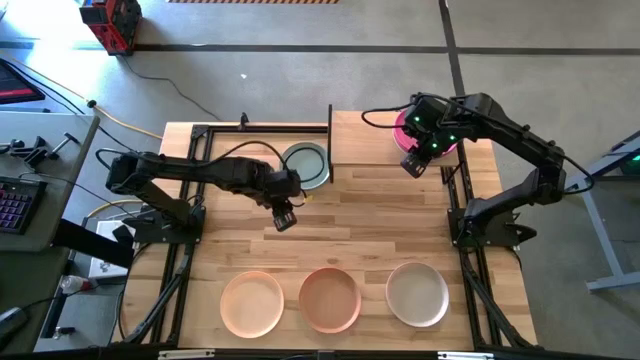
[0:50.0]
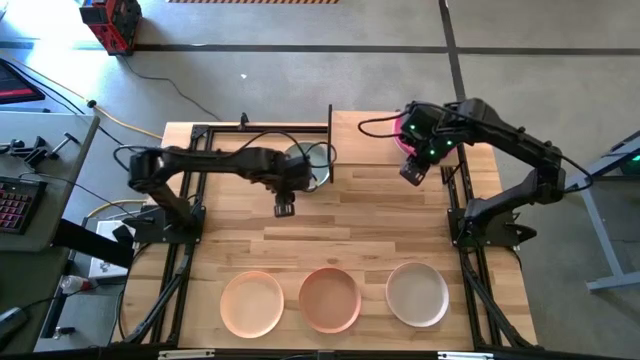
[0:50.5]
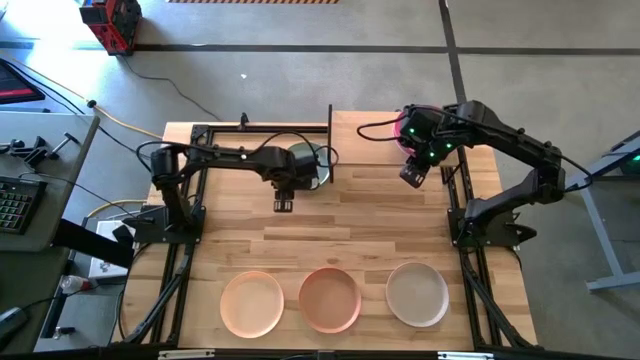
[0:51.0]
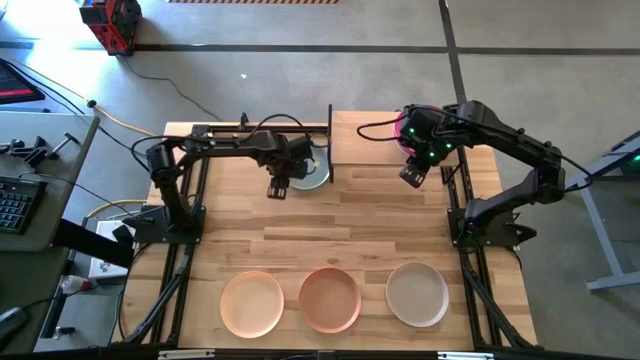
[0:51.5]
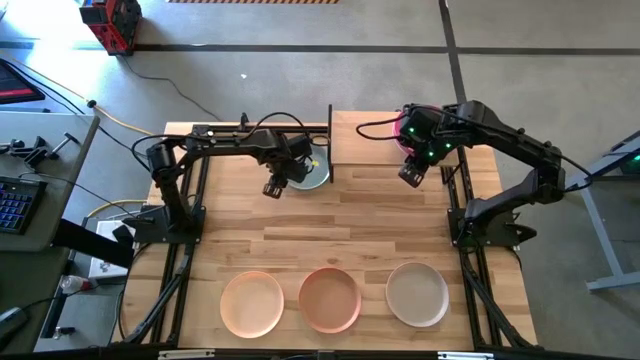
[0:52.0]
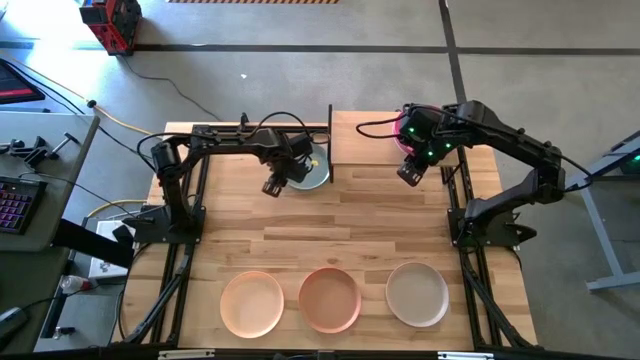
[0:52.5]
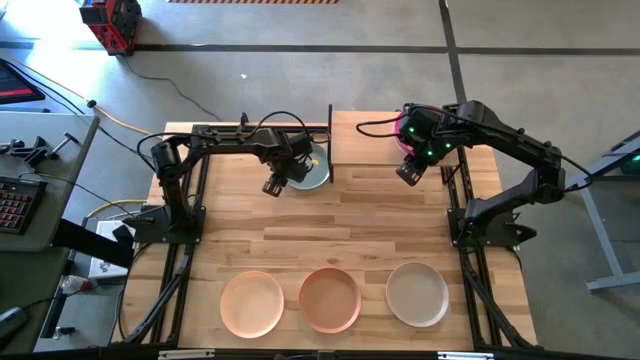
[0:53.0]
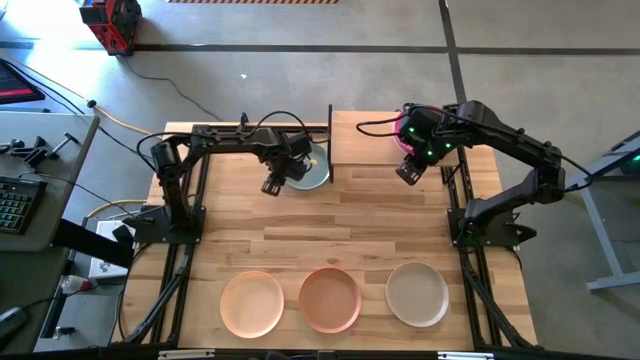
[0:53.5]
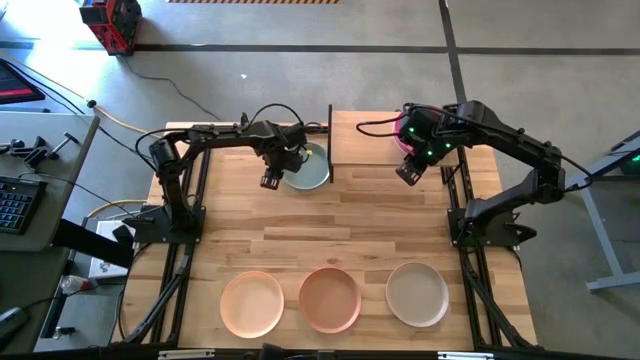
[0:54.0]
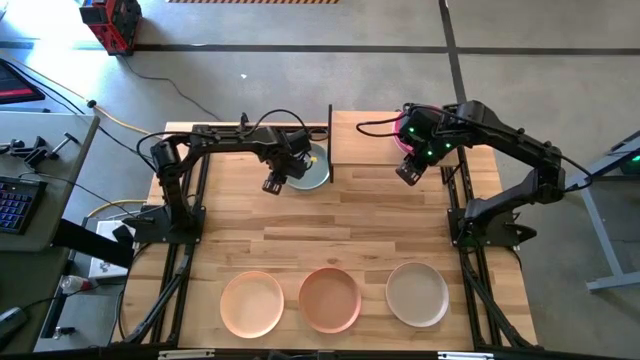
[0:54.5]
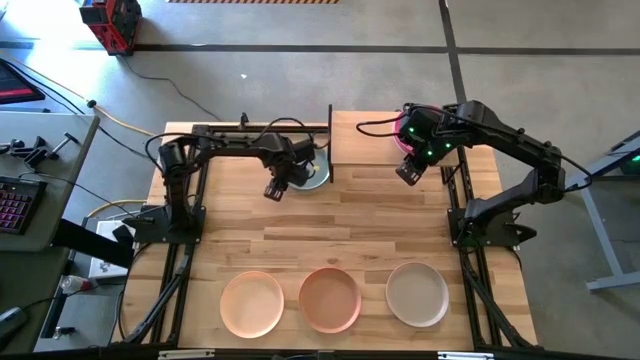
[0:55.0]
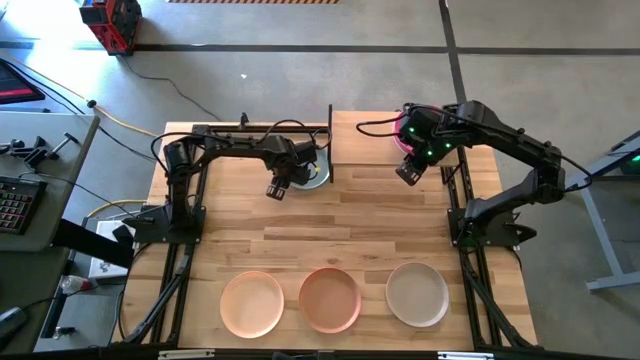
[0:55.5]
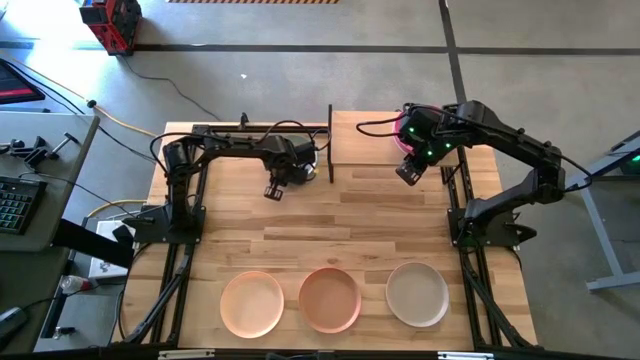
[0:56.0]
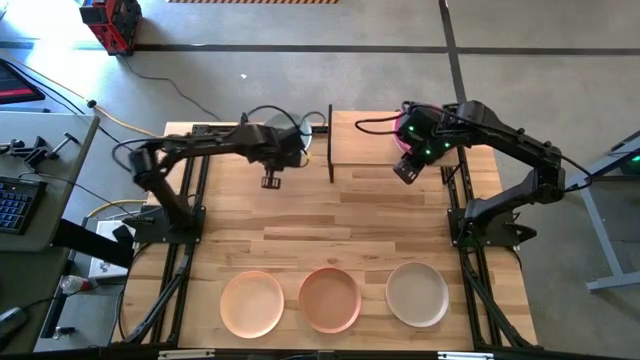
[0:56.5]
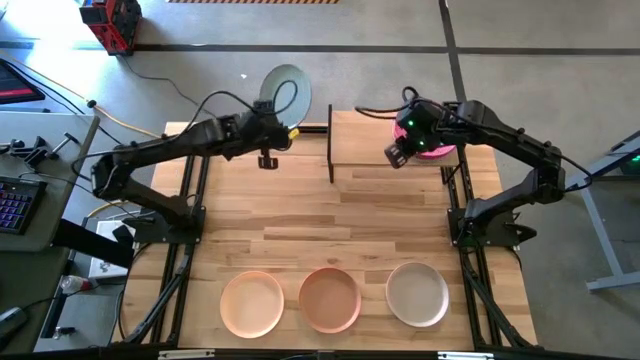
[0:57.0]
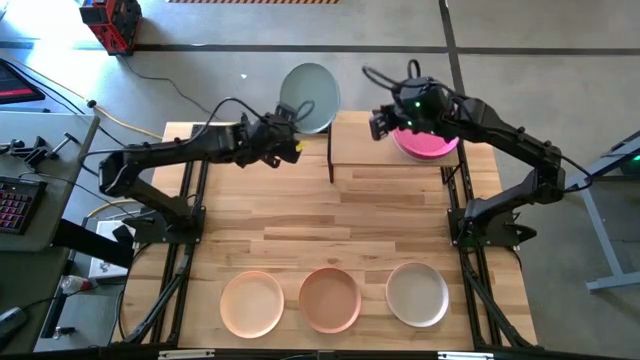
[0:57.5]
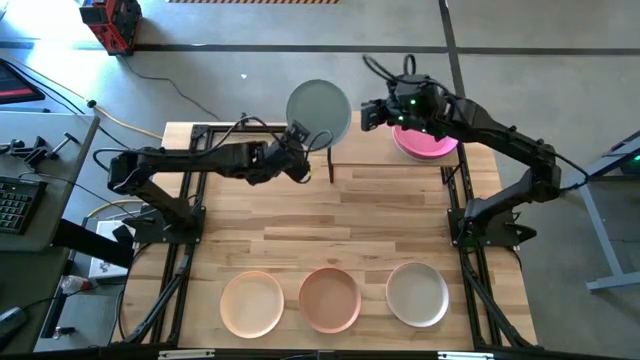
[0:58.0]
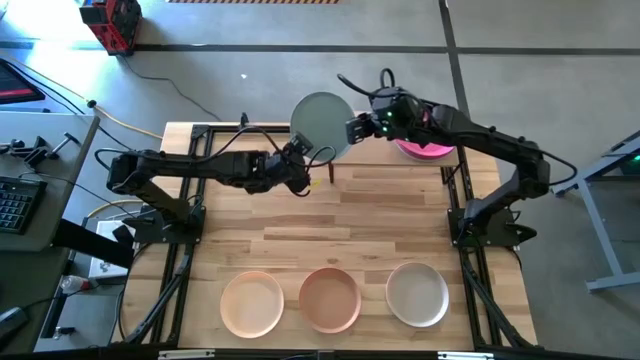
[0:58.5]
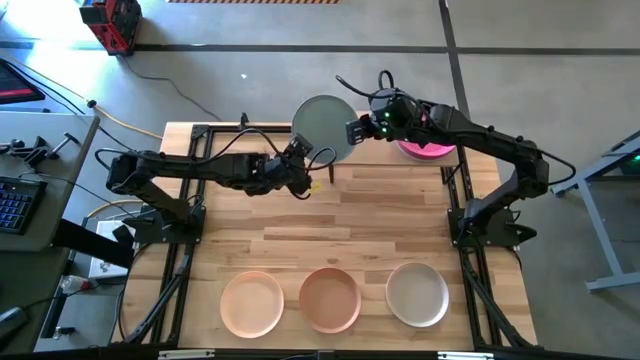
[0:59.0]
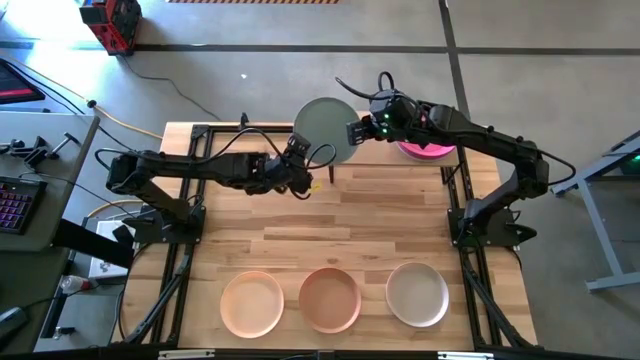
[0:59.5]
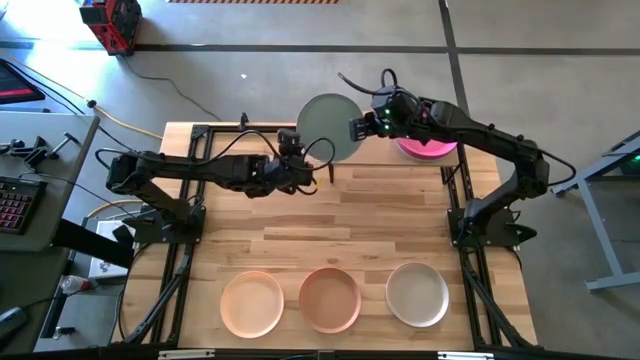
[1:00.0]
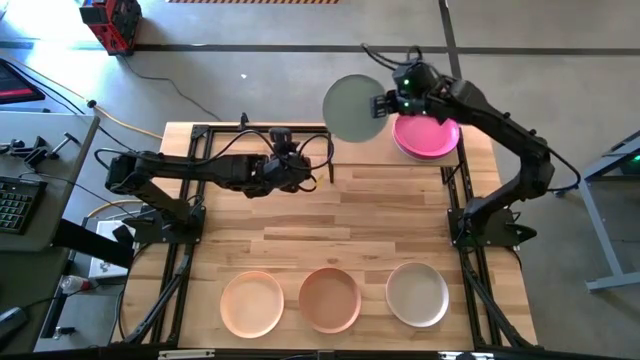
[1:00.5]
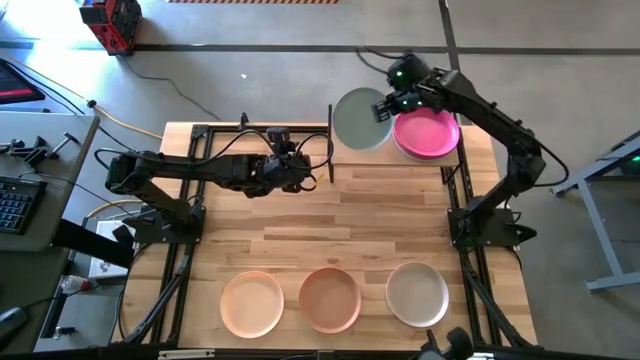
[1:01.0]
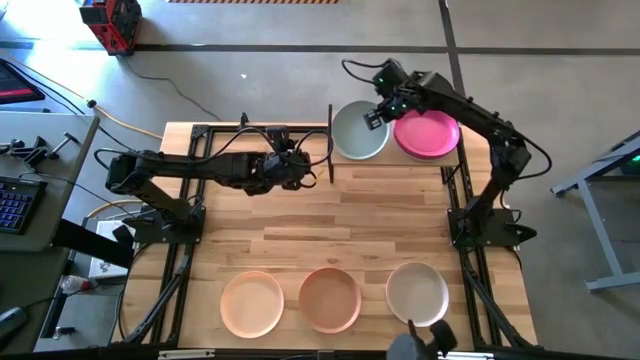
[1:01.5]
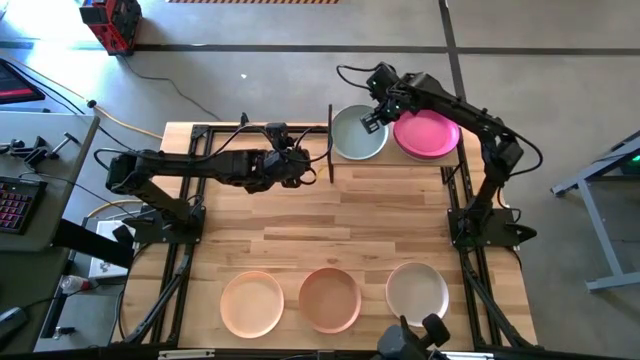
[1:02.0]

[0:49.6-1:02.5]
Task: Place and stack plates onto a shelf
Put the light blue plate on the shelf

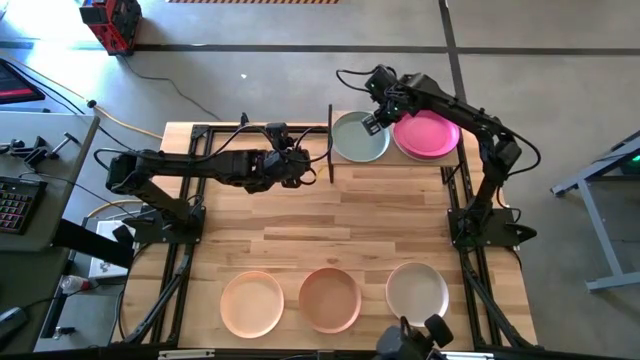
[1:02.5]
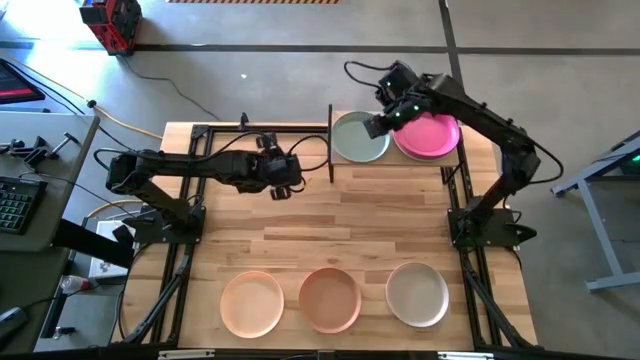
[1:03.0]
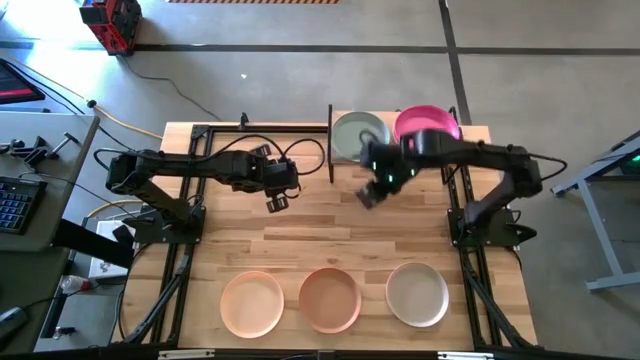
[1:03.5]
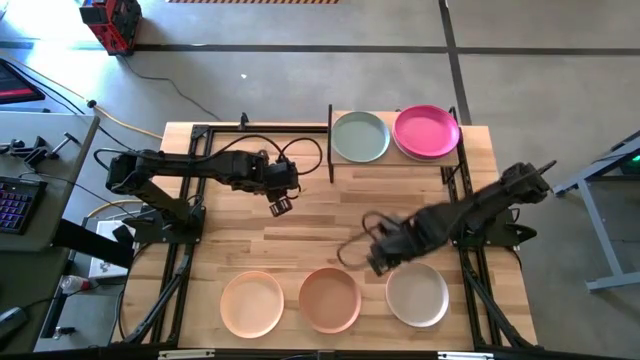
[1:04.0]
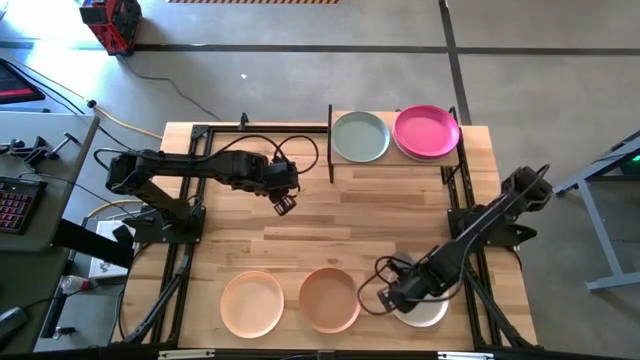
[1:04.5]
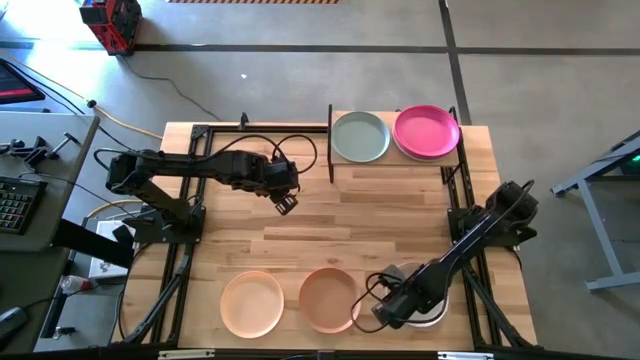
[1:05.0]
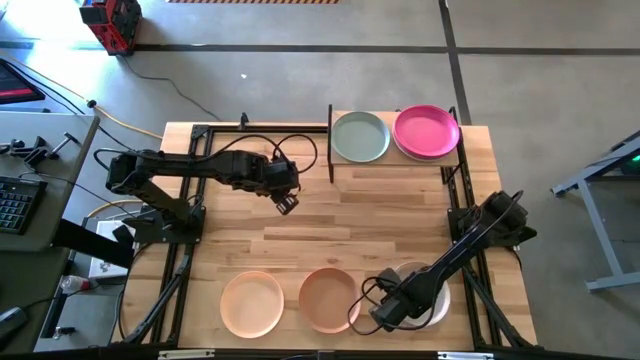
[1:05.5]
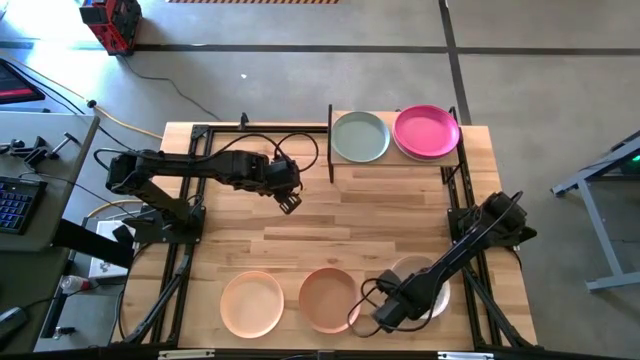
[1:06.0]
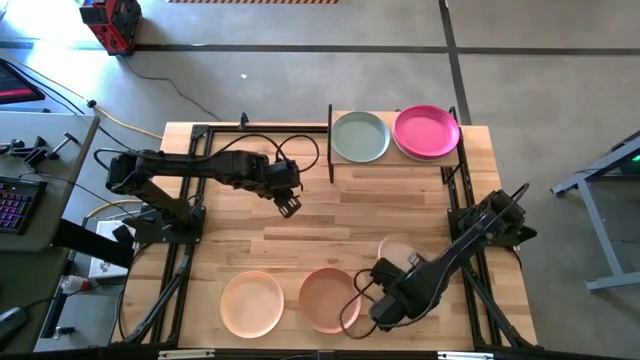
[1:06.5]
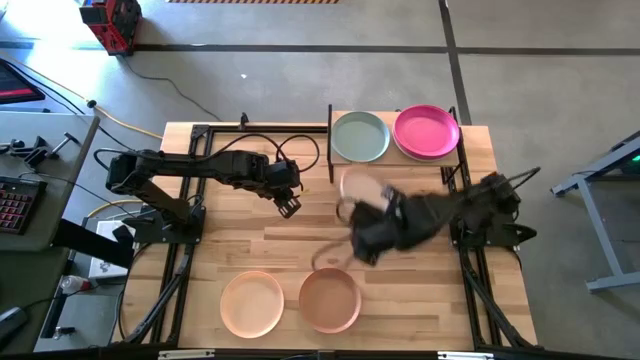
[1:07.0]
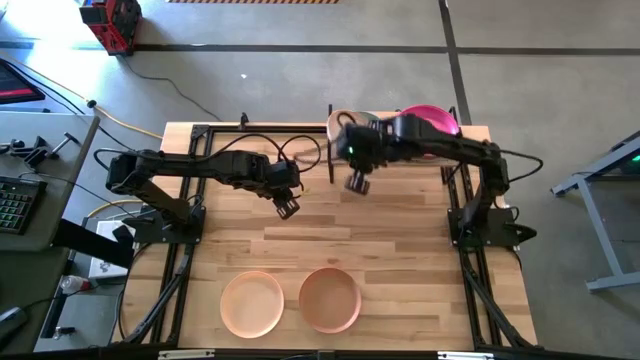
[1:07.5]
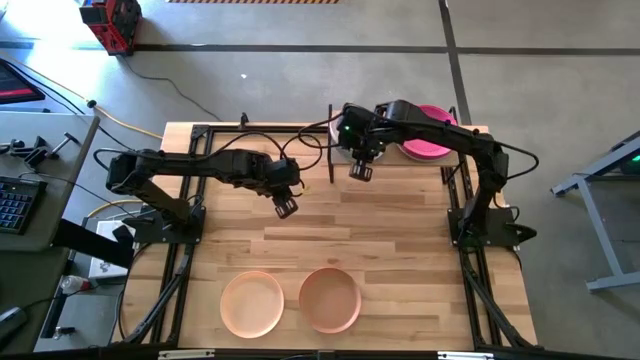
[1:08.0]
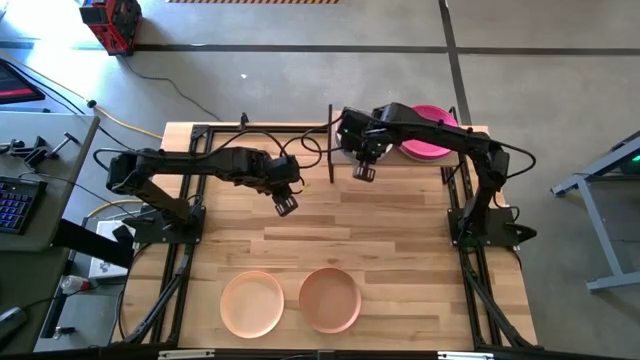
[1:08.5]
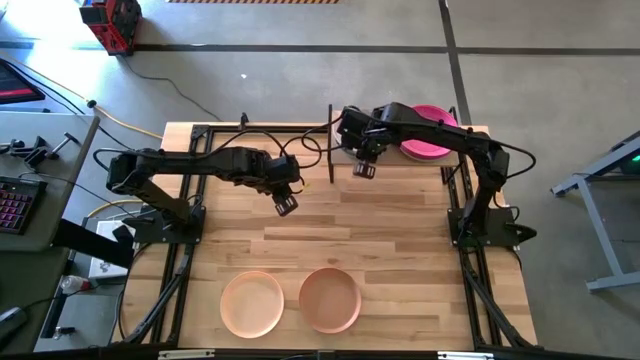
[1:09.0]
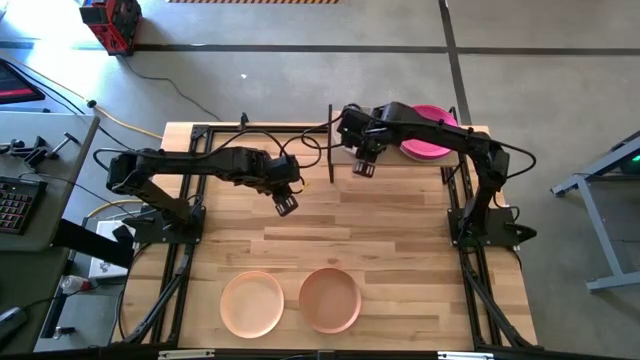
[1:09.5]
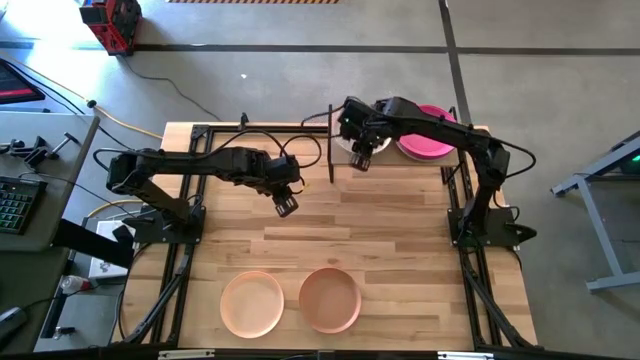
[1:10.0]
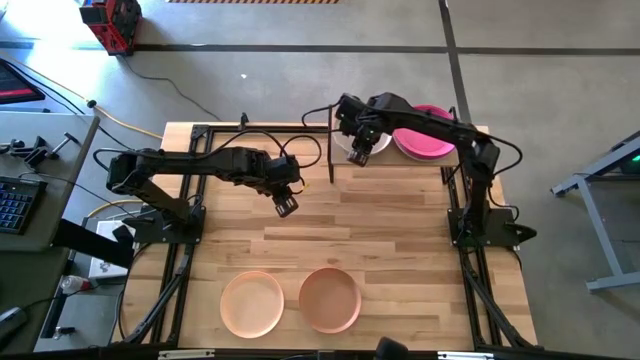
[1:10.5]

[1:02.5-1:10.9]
Stack the gray plate on the light blue plate on the shelf

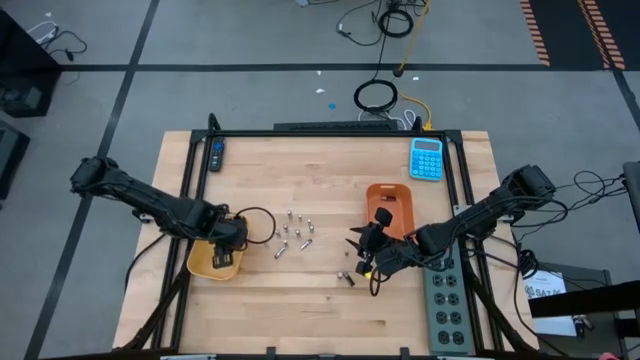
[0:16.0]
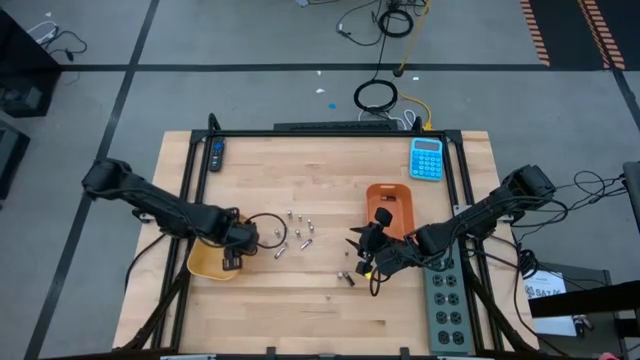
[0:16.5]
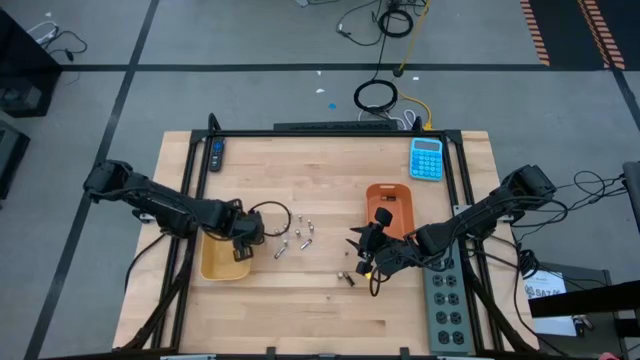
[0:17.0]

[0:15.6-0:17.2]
Task: Sort batteries
Adjust the yellow bin
